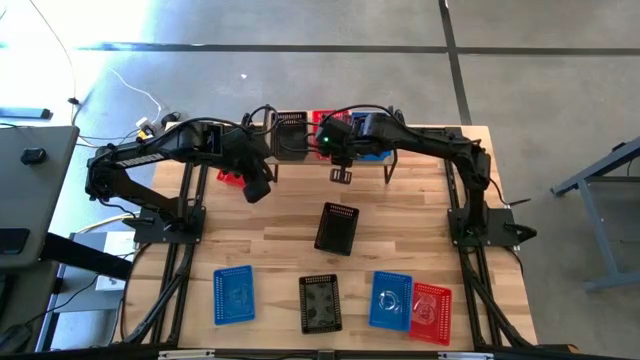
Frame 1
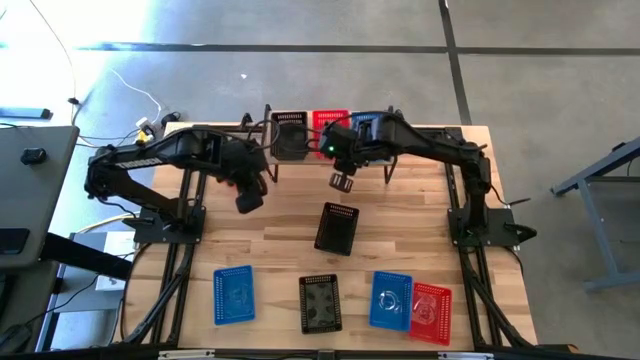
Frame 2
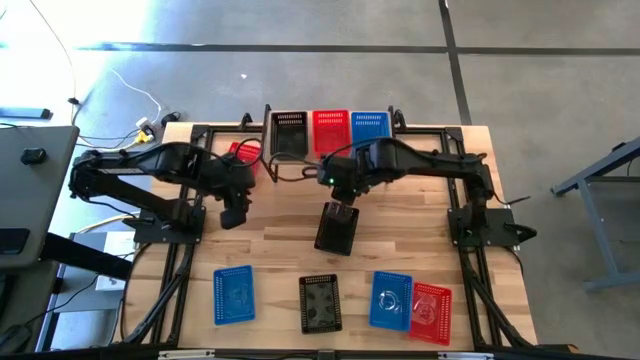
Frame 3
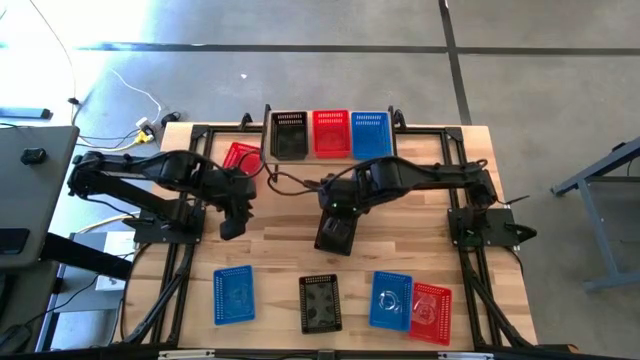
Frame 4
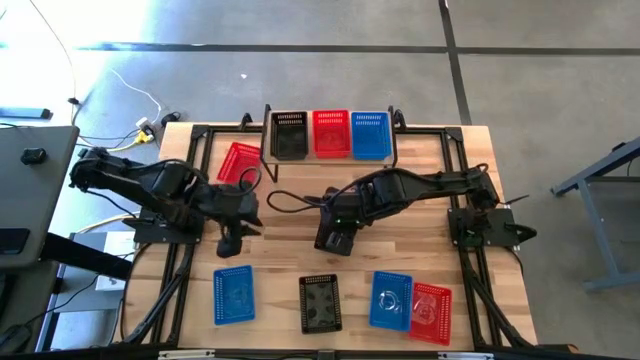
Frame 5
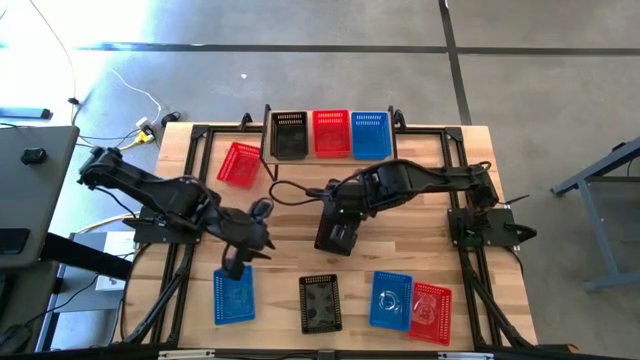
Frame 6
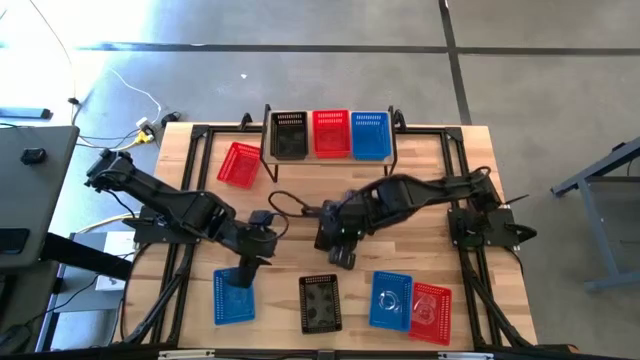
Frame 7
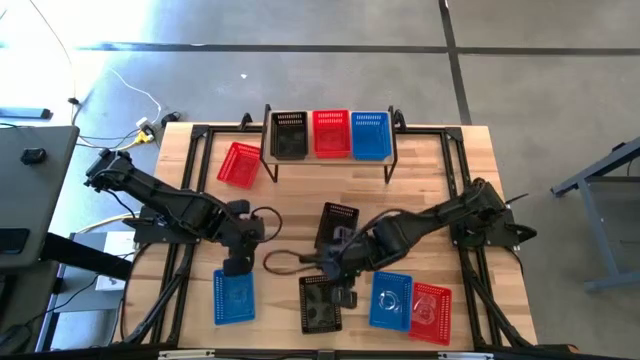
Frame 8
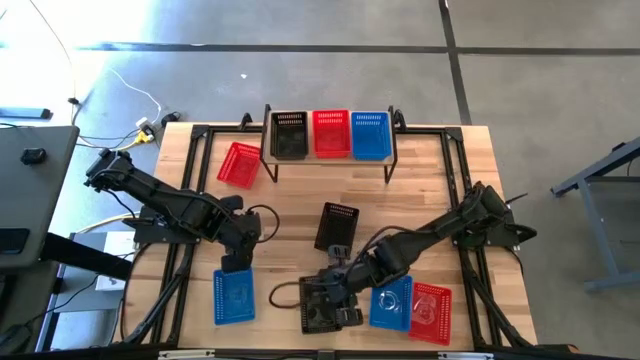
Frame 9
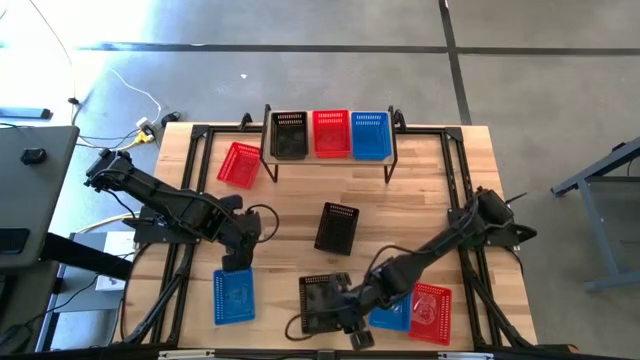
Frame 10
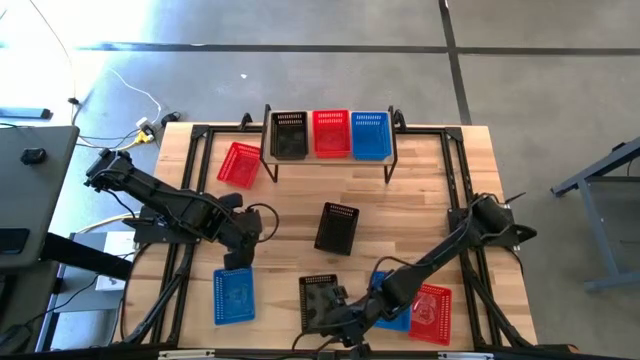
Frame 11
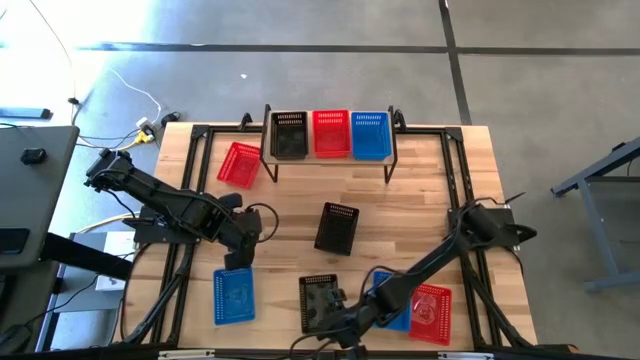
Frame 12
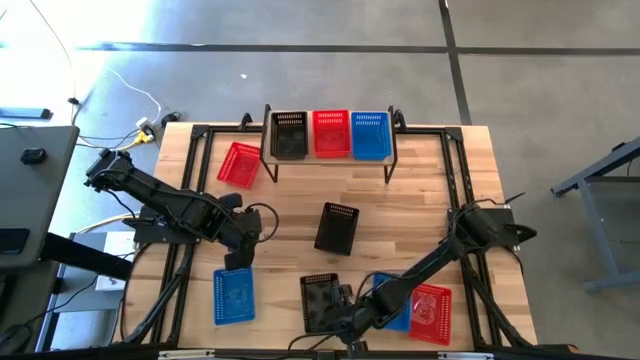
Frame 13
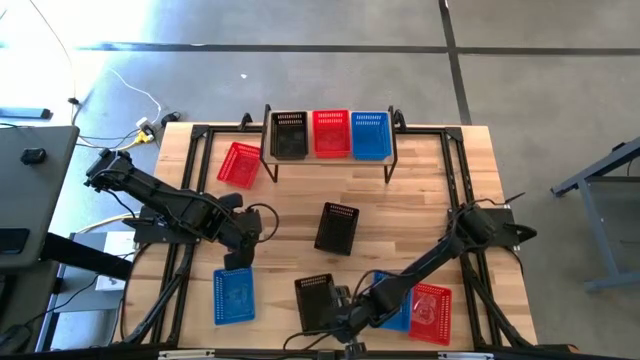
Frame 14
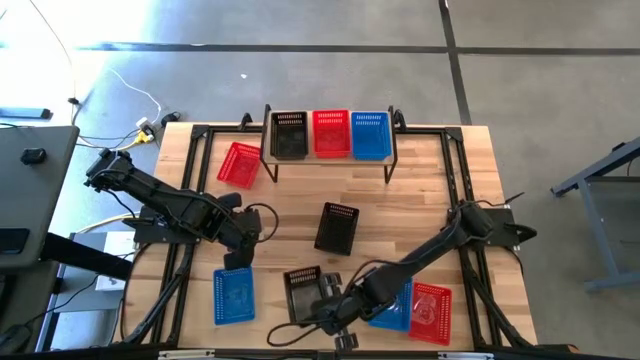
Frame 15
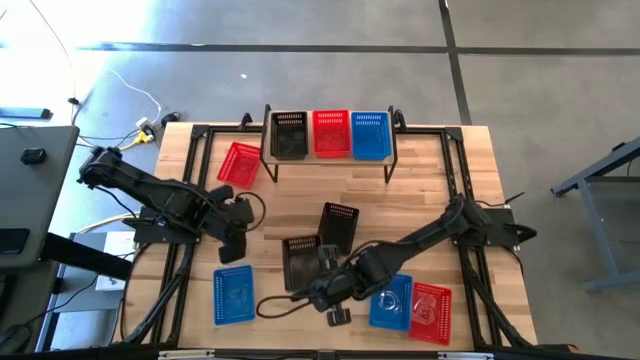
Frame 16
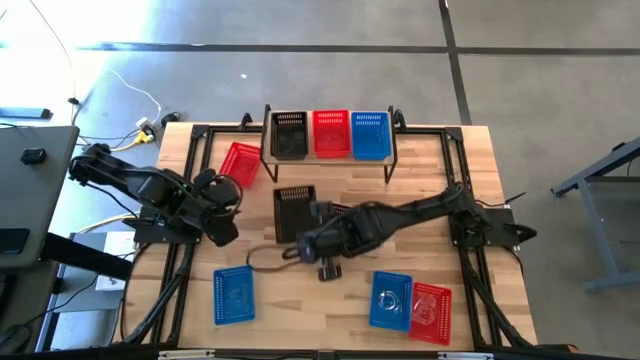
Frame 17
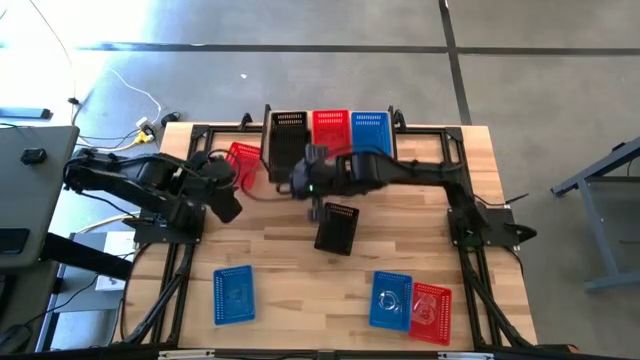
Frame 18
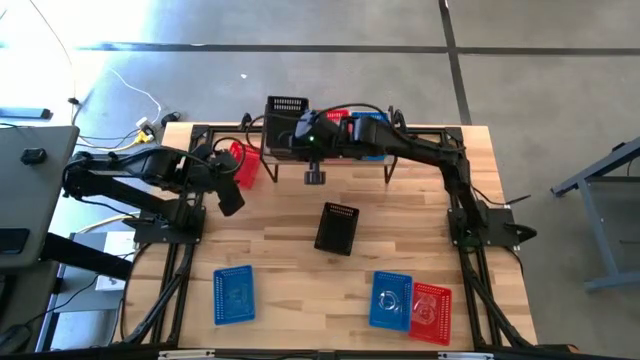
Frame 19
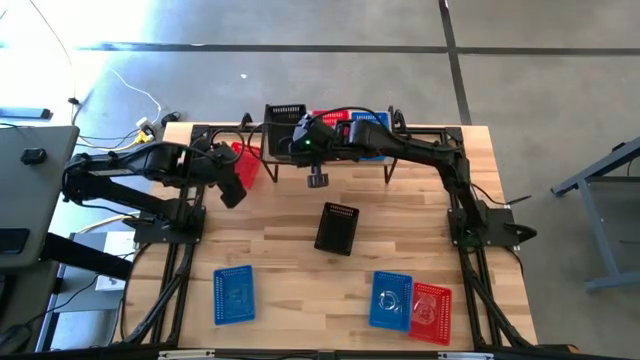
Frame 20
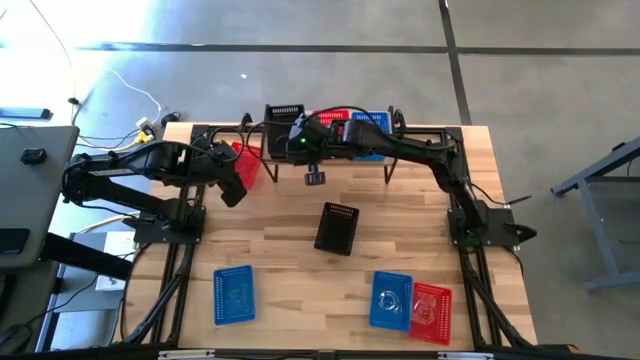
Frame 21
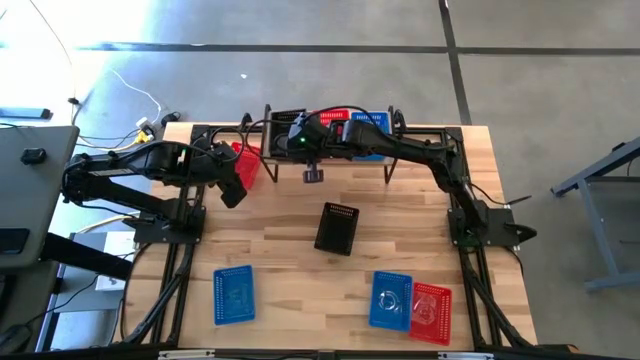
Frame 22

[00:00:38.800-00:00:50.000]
Task: Stack baskets on shelf by color
Stack the bottom black bin on top of the black bin on the shelf

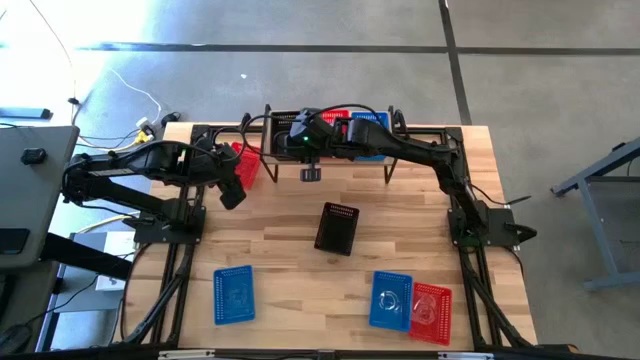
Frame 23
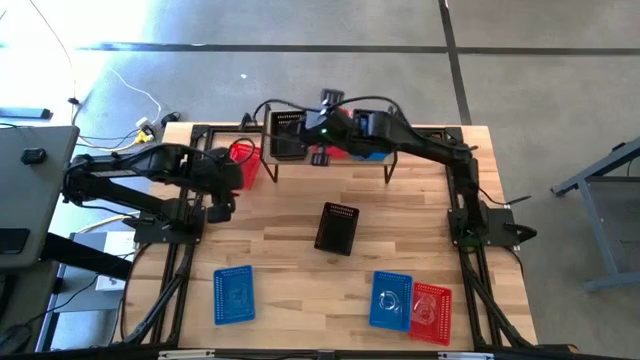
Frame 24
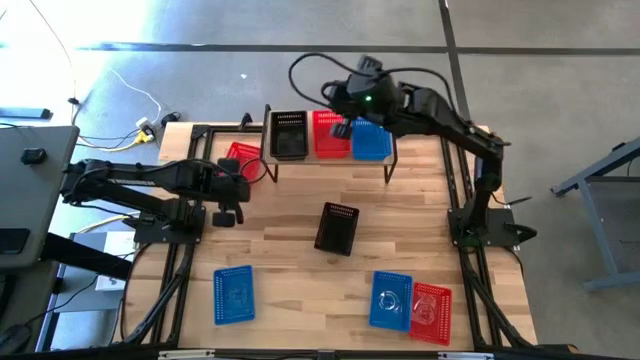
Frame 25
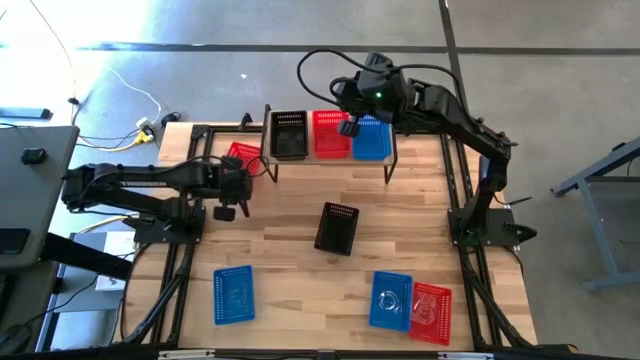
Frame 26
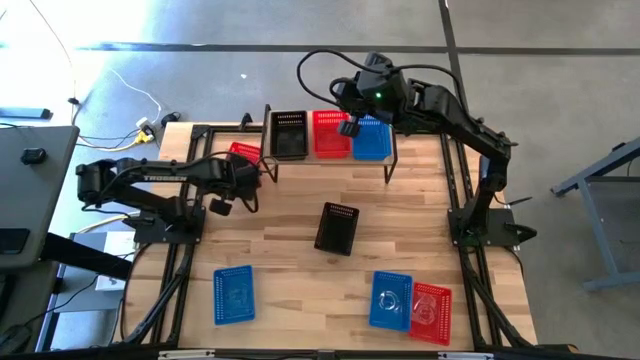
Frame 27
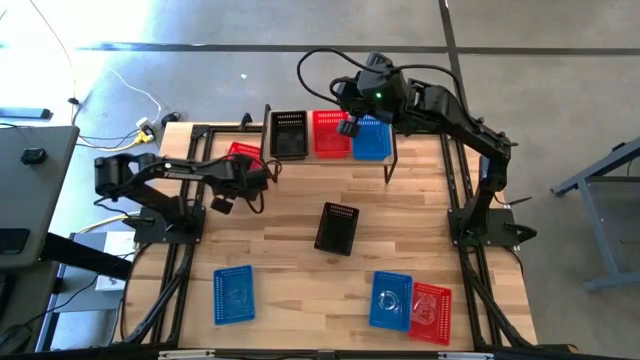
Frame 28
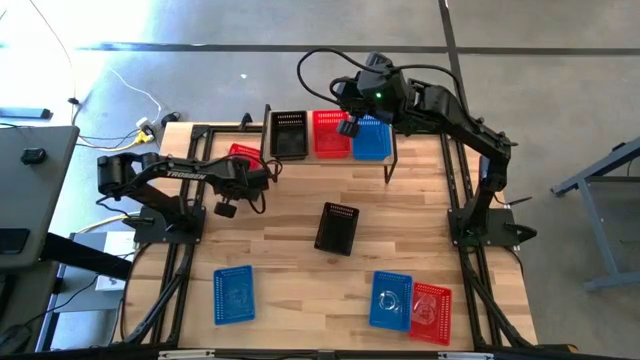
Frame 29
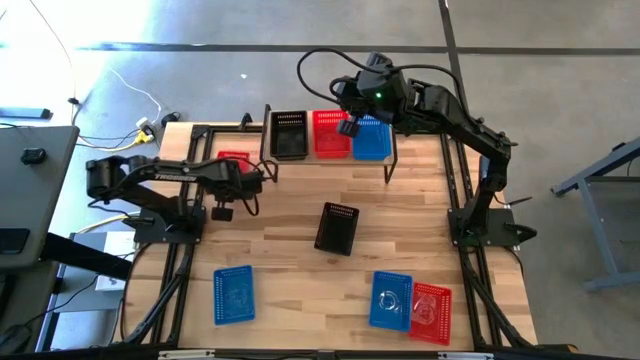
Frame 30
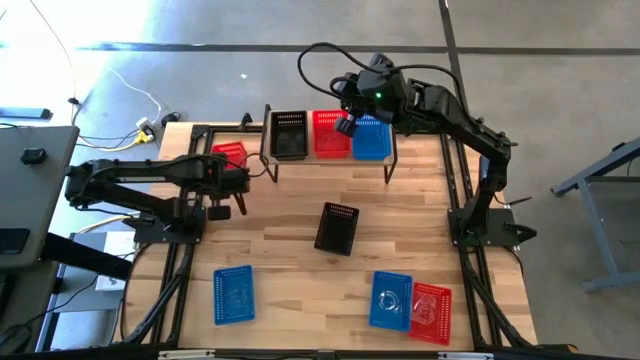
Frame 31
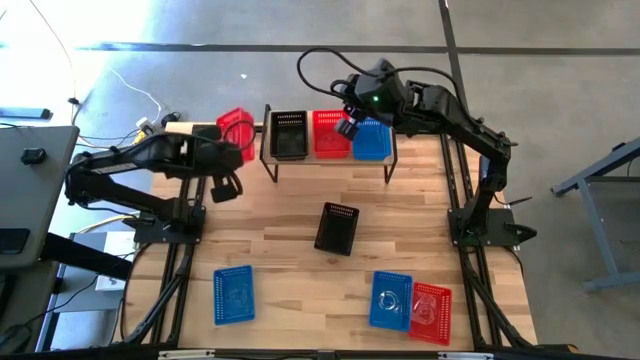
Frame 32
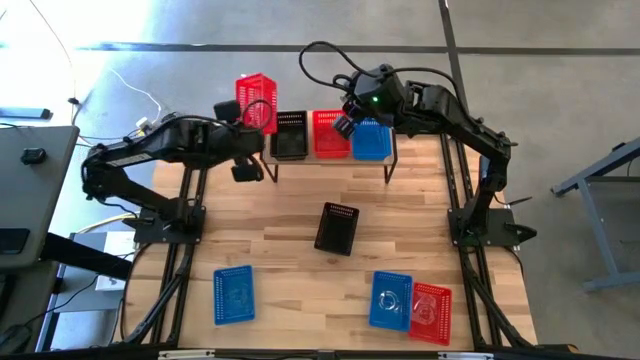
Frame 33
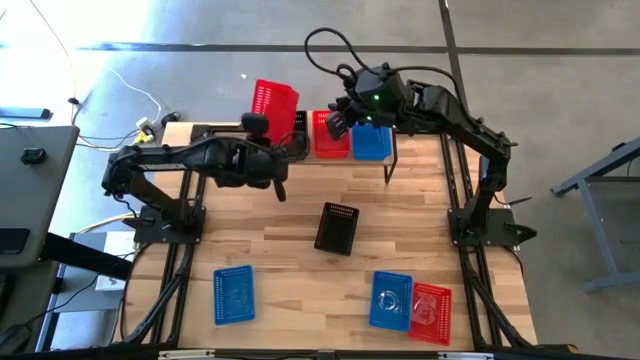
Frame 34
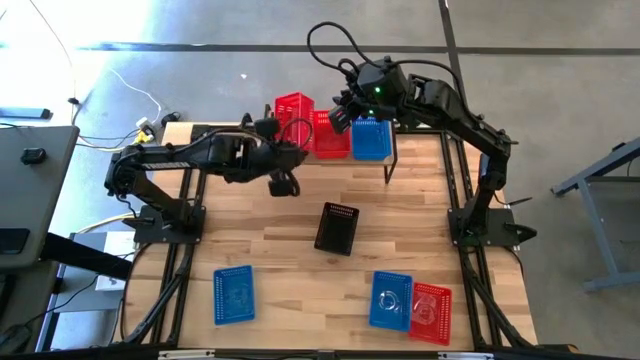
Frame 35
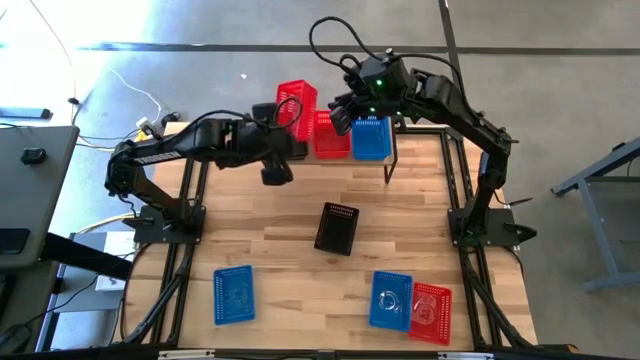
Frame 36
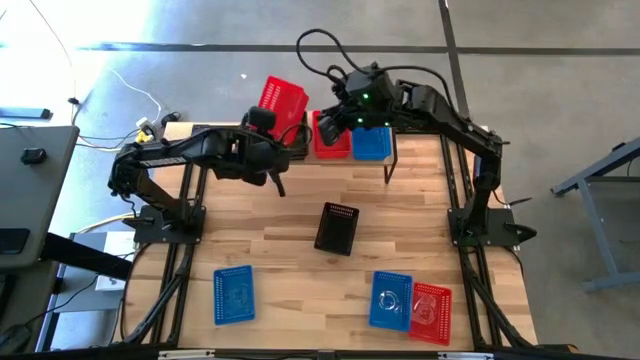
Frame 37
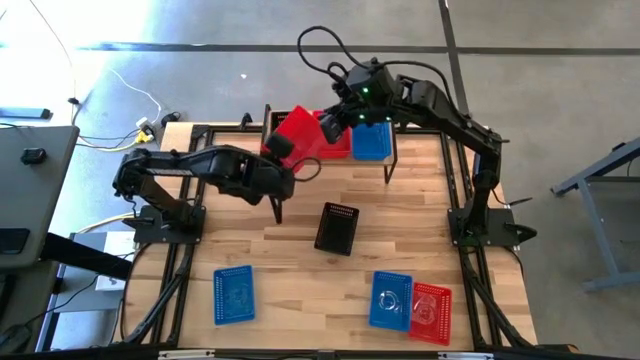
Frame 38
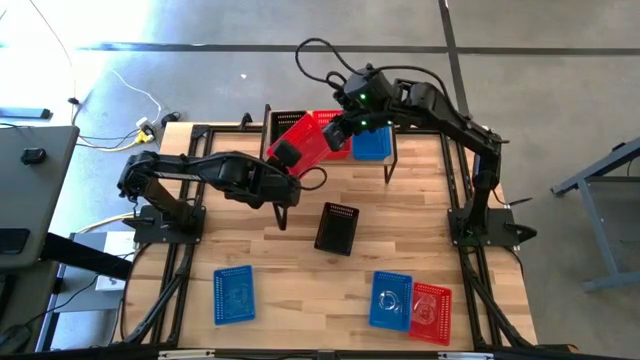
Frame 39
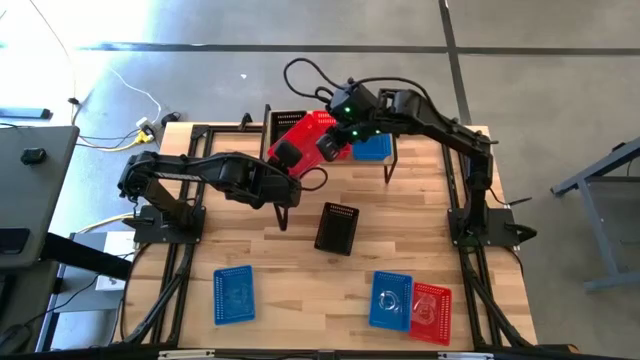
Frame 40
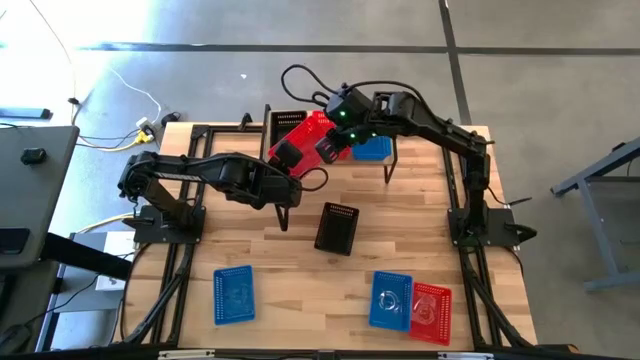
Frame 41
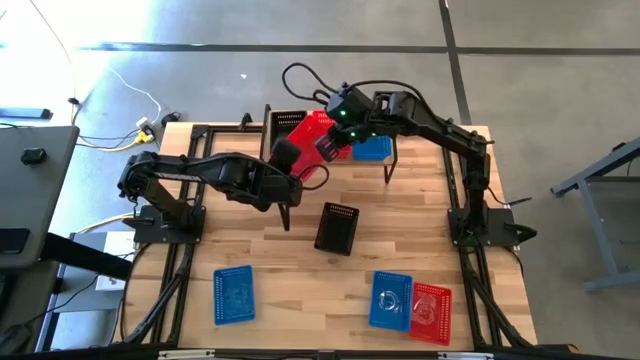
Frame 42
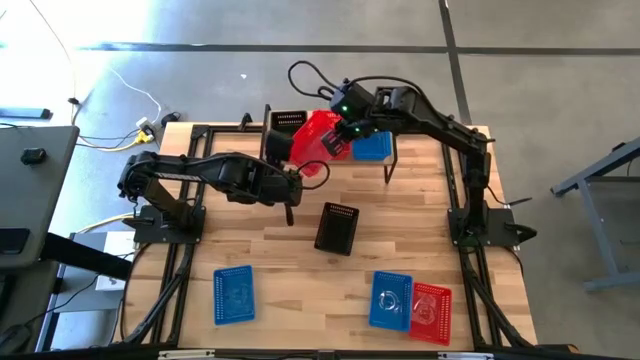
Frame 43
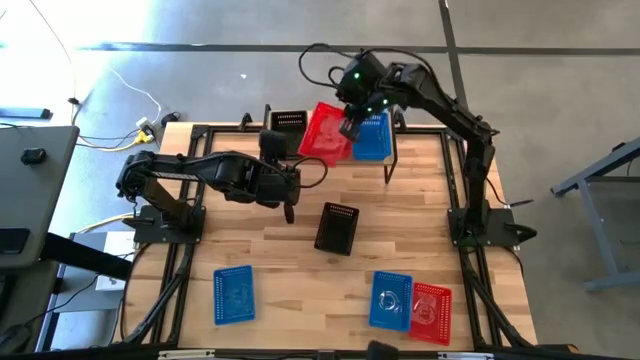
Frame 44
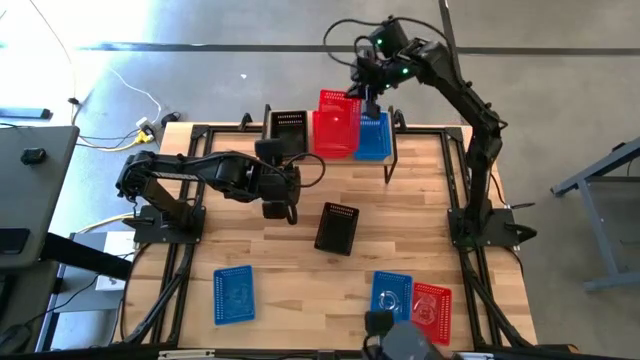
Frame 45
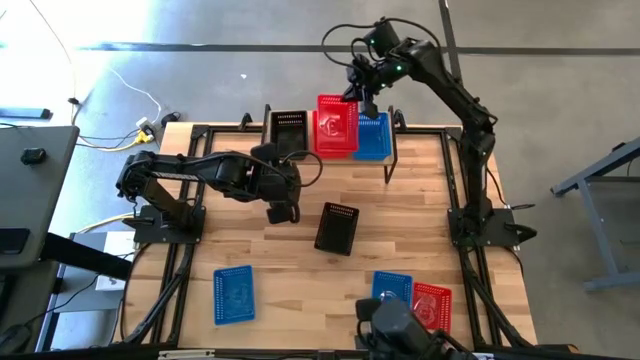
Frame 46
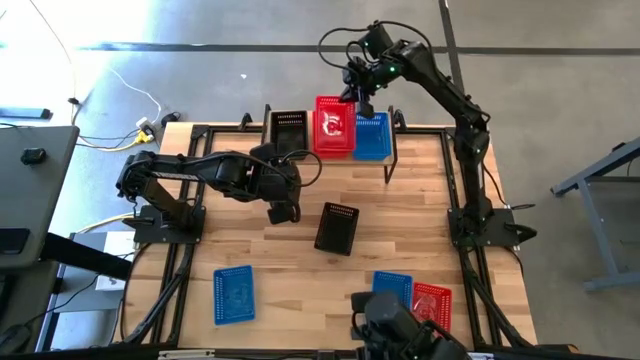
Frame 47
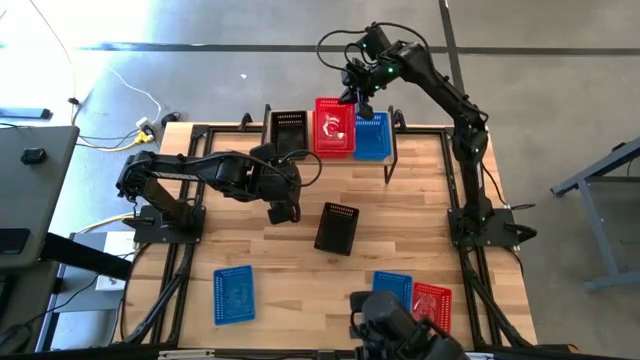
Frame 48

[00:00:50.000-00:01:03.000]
Stack the left red bin on top of the red bin on the shelf
